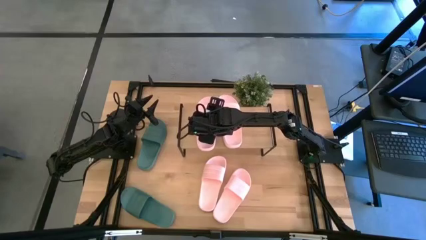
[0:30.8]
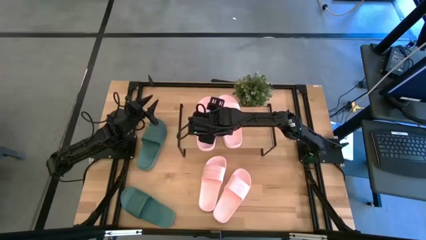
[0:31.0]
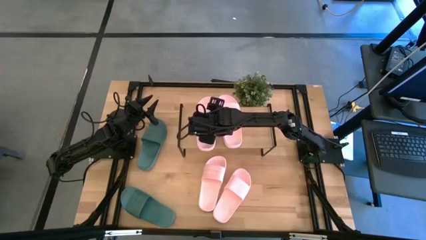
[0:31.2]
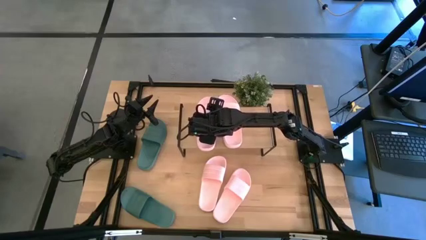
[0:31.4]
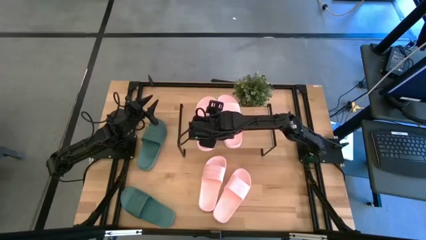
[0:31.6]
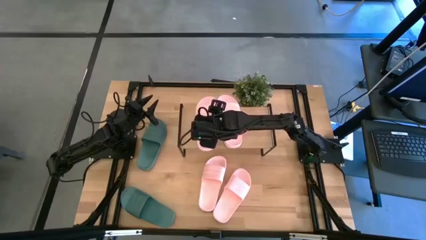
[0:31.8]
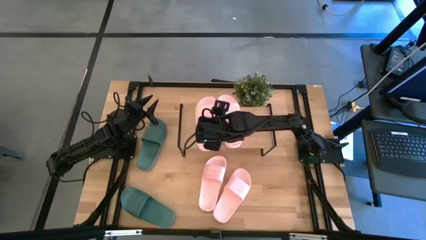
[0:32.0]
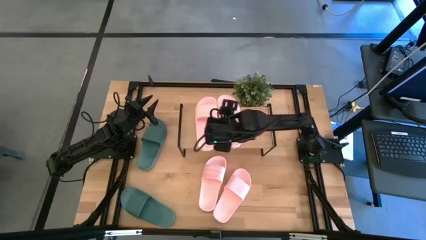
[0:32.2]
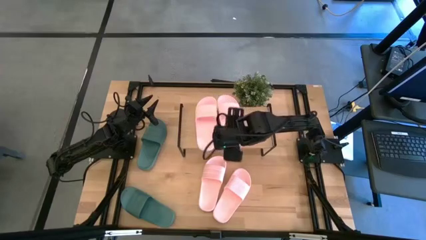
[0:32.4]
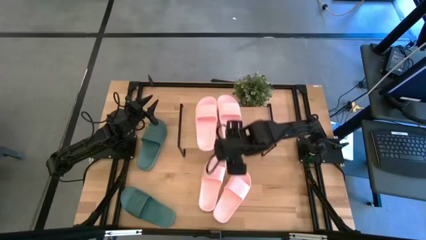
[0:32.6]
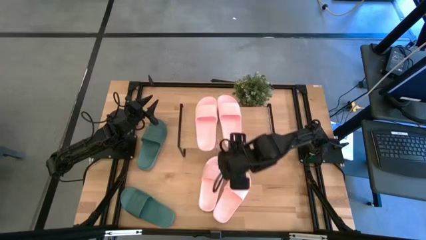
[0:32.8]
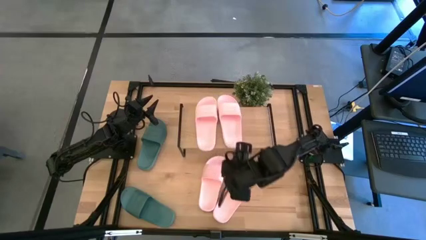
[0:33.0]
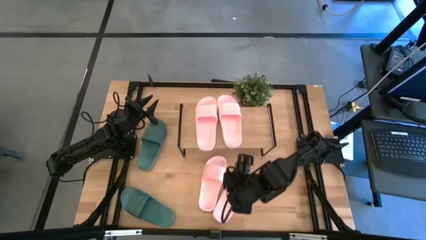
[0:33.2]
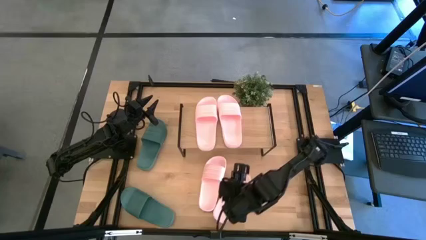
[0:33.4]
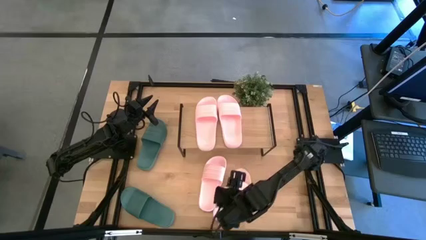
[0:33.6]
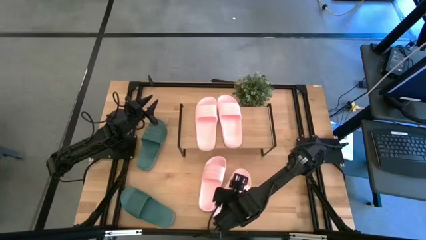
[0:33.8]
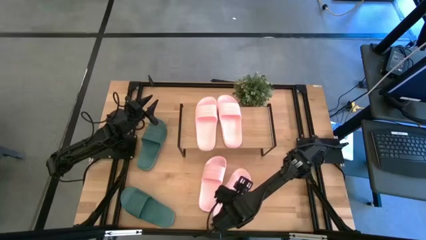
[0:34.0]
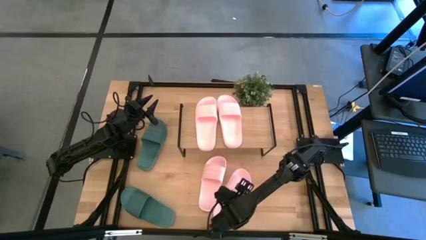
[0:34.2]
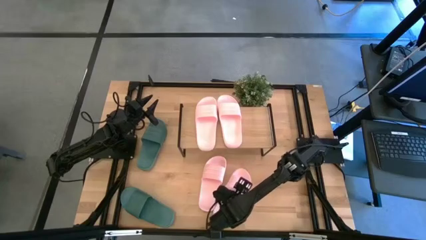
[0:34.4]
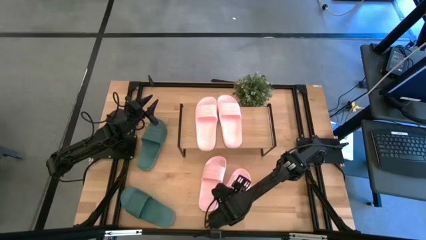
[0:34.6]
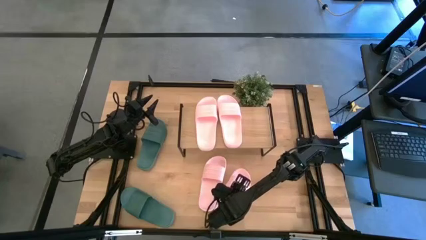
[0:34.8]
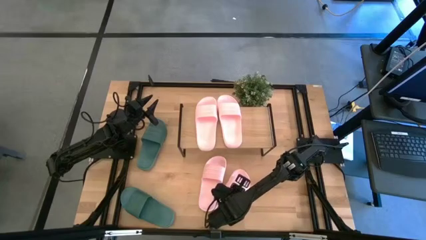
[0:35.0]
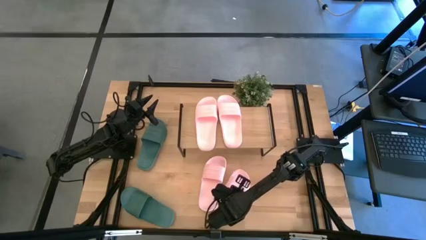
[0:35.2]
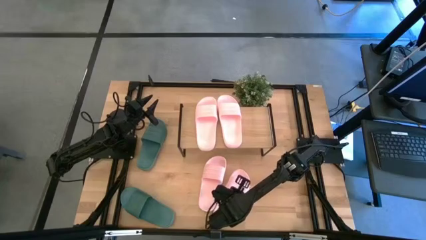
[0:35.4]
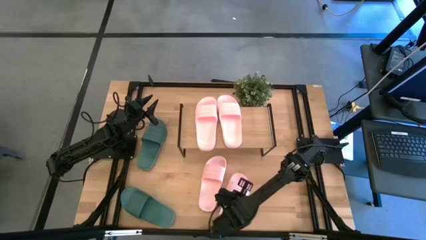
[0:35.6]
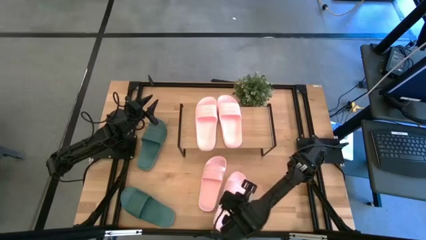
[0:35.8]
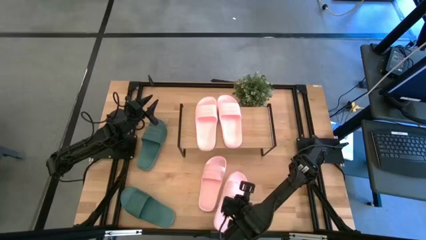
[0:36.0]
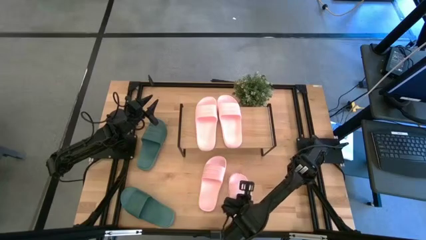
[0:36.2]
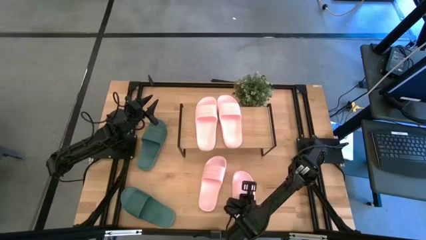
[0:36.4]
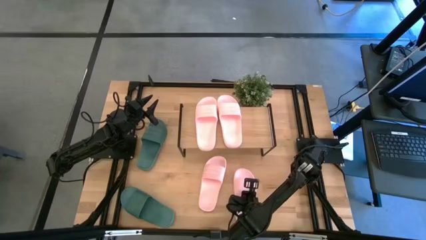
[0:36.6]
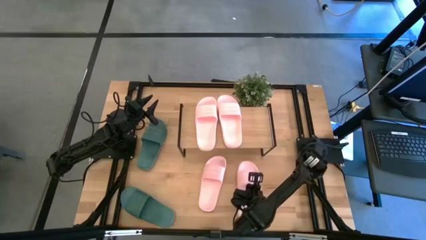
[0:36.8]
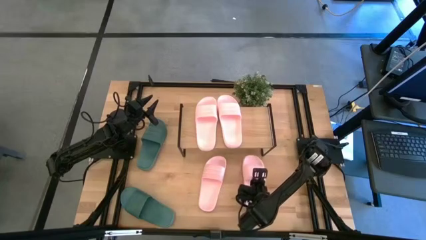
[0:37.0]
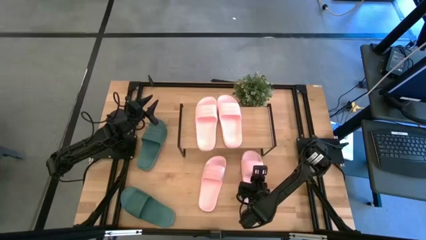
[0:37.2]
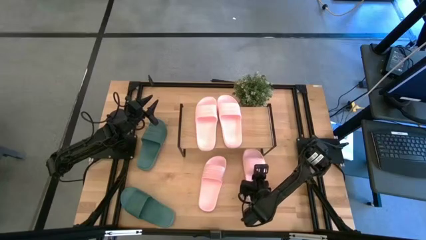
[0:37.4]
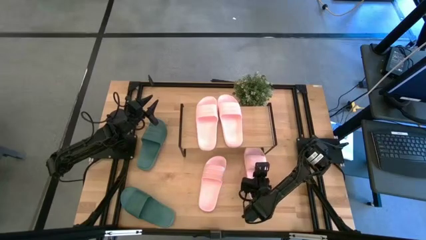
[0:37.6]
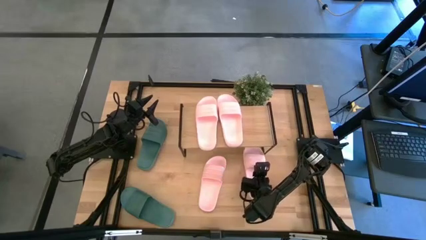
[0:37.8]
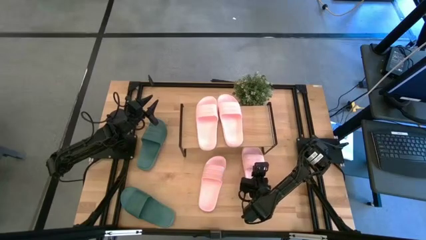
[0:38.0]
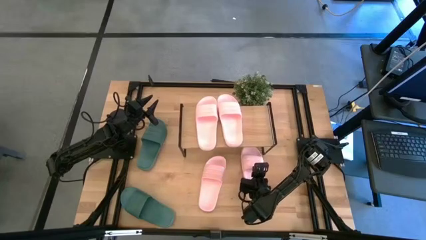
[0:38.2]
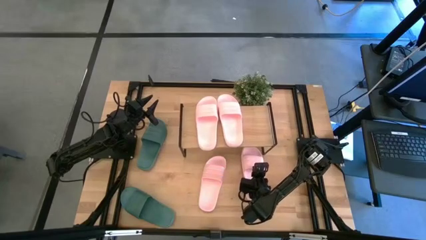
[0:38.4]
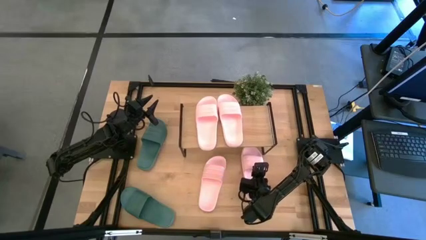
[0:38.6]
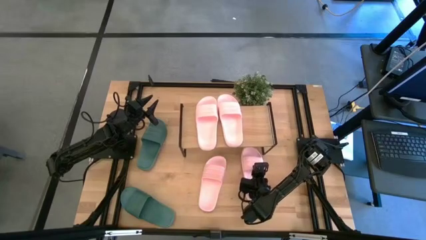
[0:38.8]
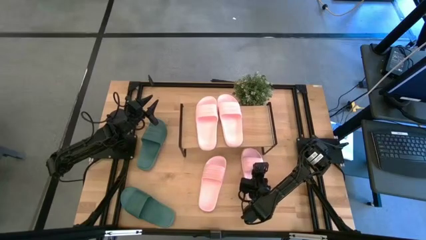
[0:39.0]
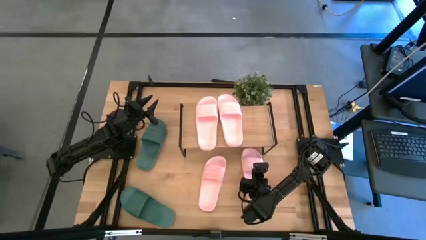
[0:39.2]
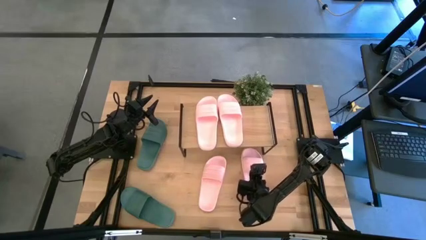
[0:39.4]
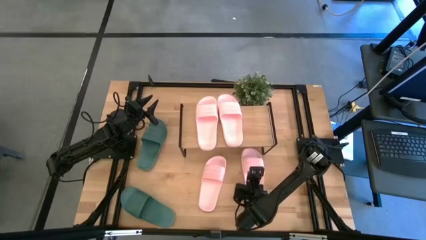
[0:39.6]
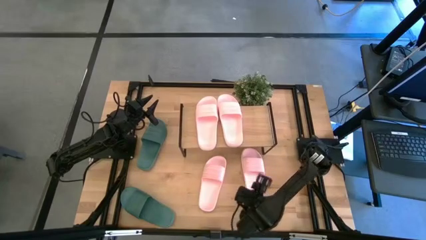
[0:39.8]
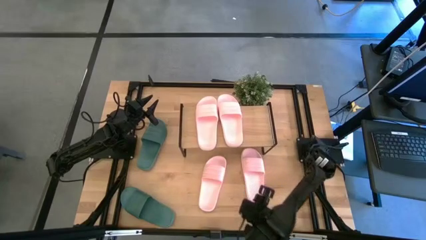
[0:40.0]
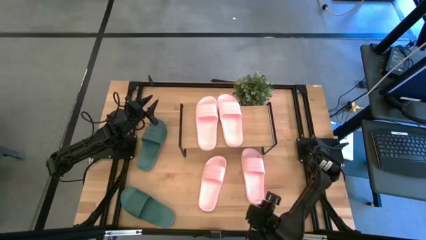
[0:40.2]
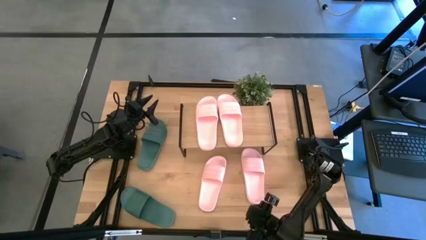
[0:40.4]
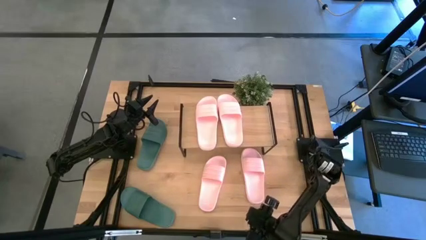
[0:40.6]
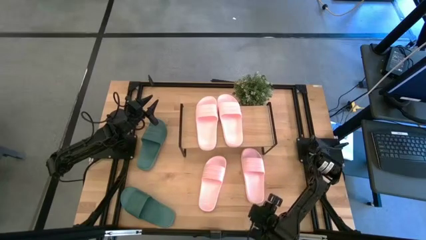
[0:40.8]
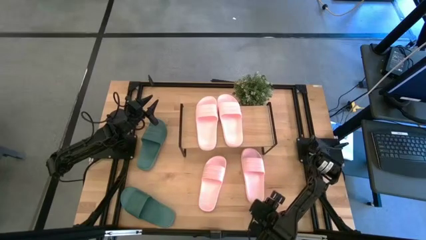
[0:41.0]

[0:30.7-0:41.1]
Task: Pick and place slides into the shelf
Put the pink slide under the shelf

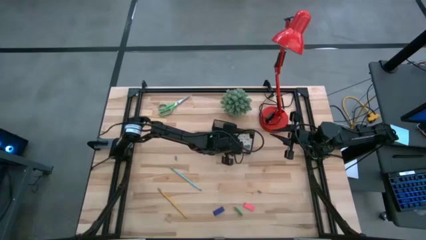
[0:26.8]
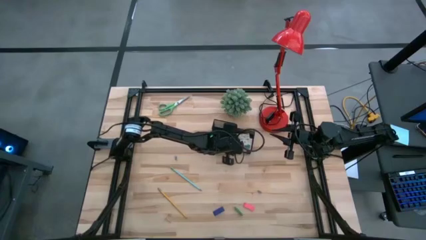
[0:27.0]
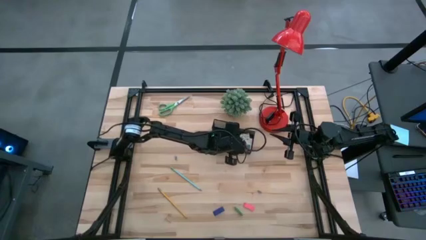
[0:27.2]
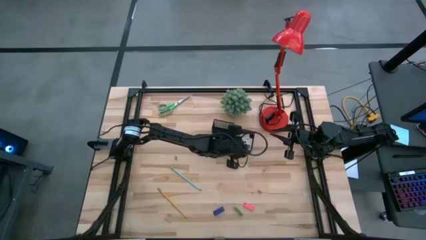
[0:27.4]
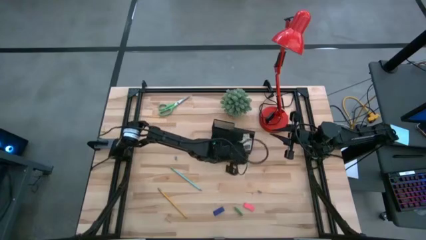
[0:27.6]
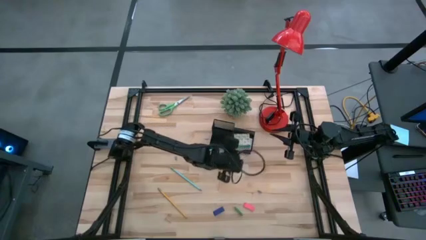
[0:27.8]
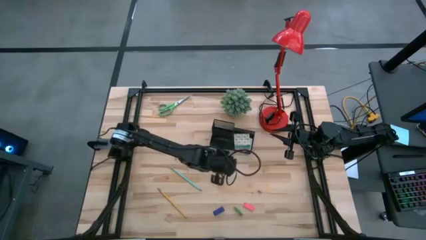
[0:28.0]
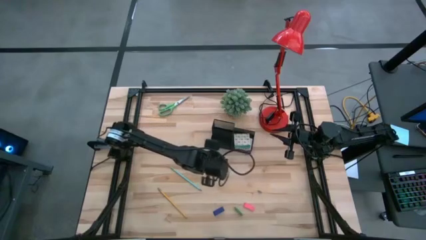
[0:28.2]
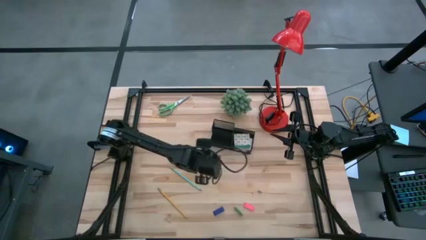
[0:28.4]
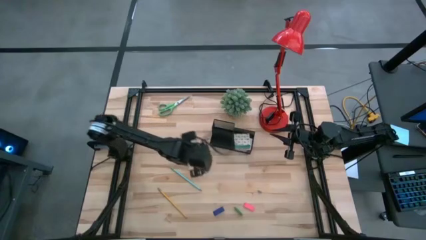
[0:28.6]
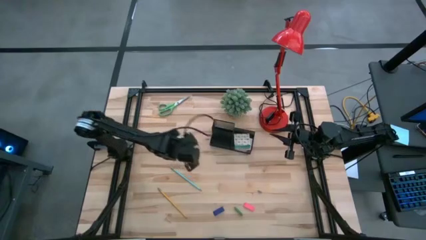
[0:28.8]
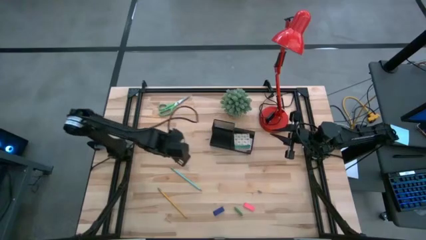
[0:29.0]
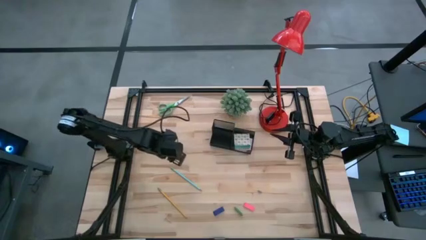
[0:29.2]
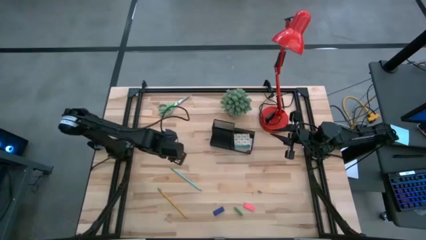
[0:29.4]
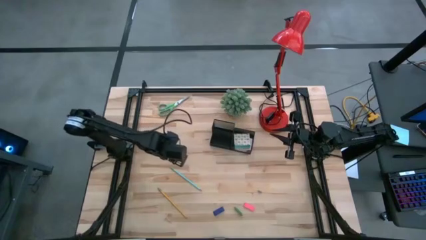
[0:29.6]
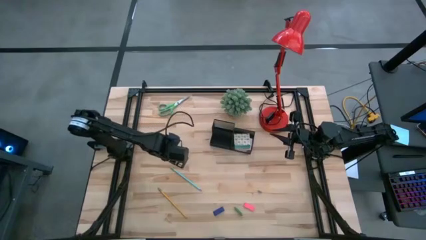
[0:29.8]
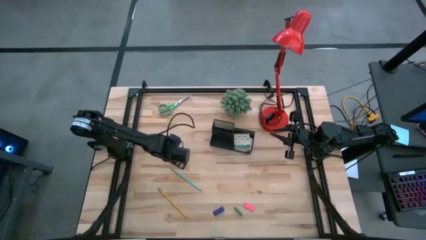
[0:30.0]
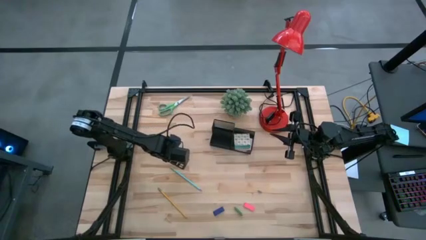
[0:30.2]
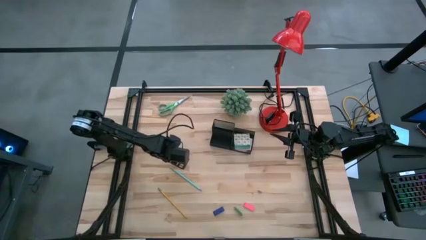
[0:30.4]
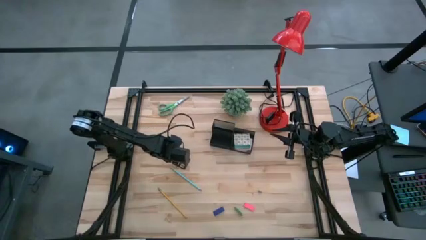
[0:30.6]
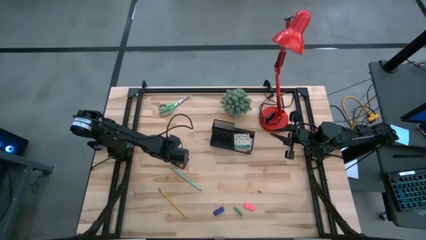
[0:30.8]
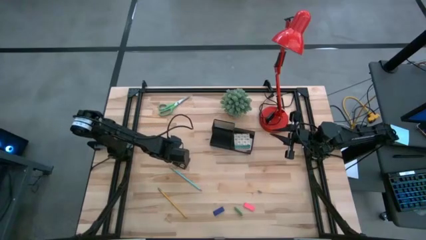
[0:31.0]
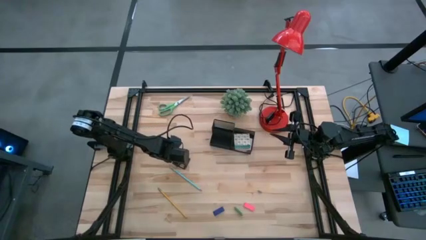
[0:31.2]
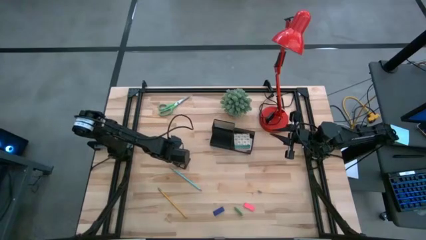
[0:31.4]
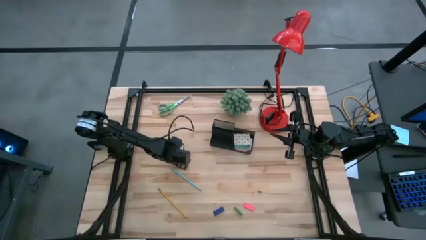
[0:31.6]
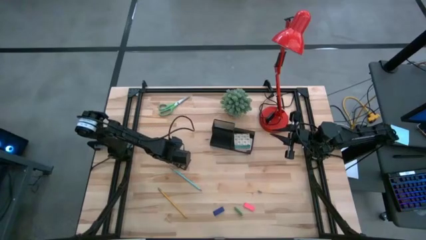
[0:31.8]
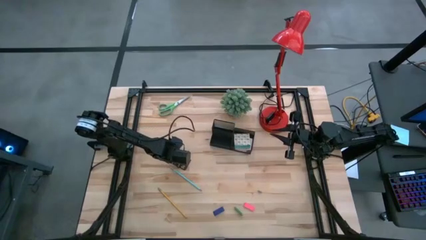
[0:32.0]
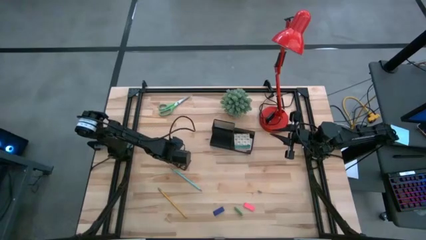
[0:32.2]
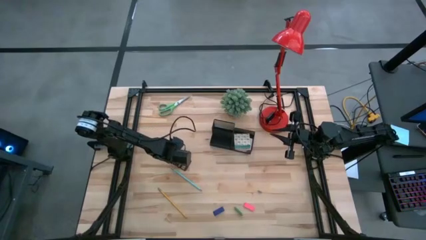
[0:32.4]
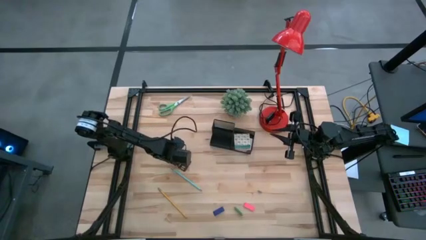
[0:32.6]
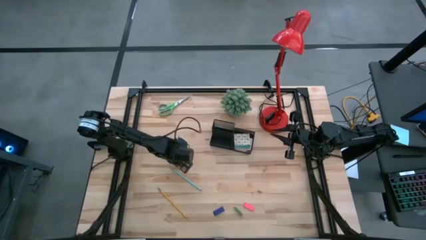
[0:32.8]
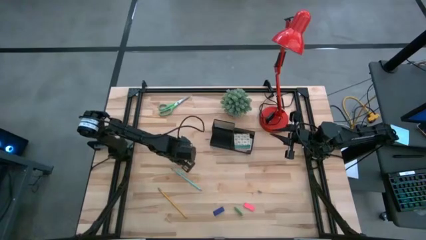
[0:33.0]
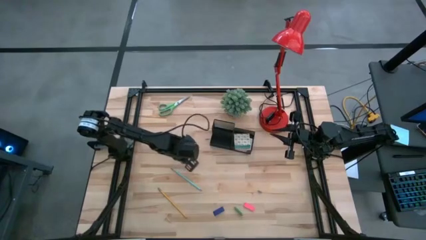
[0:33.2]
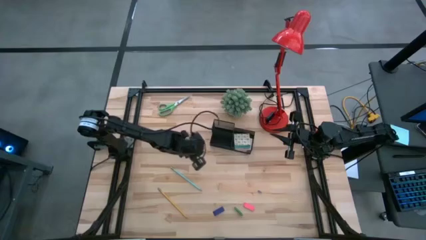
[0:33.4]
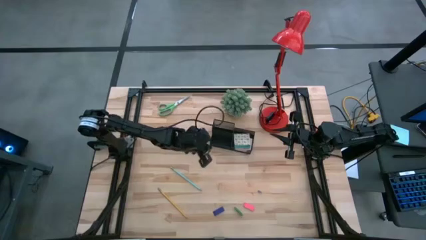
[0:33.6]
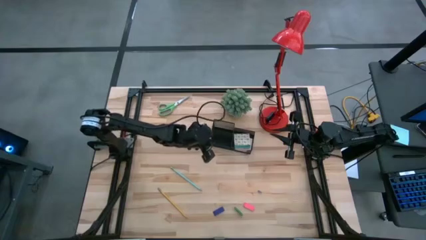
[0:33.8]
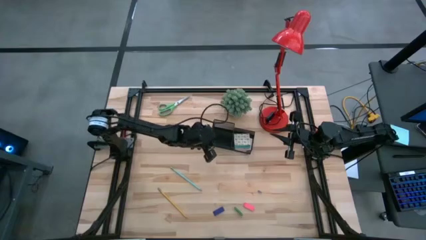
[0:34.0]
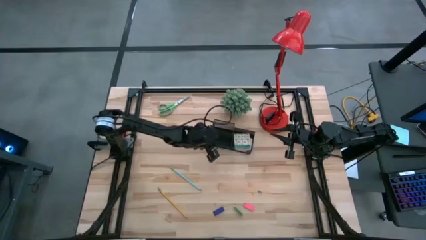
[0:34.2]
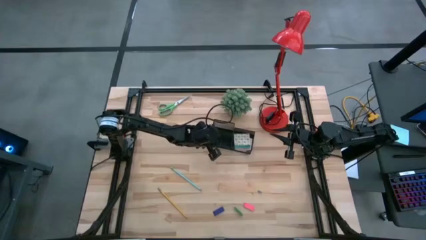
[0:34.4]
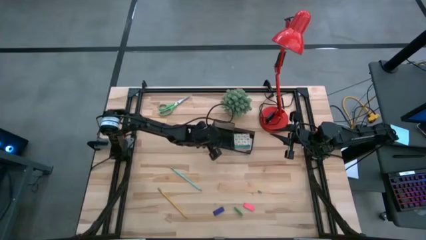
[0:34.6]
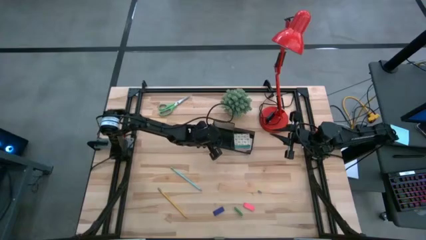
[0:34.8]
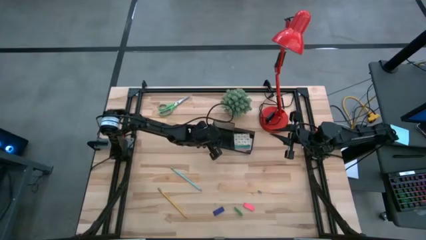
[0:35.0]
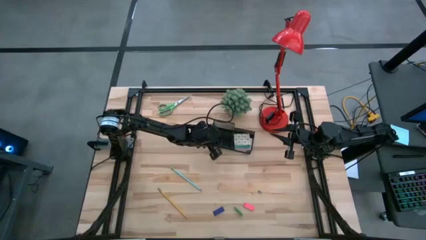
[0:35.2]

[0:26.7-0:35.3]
Task: Pick and place office supplies into organizer
Put the left blue binder clip into the black desk organizer
